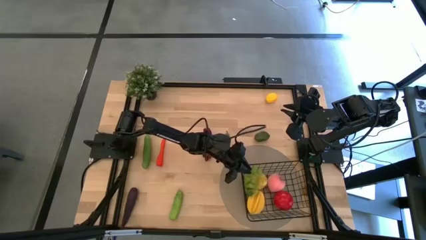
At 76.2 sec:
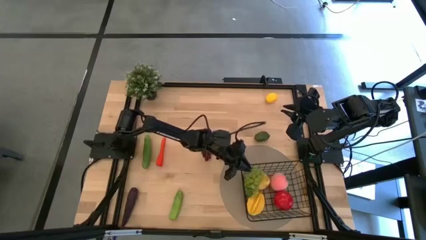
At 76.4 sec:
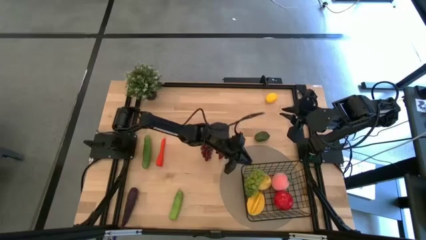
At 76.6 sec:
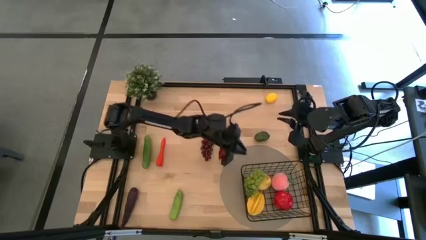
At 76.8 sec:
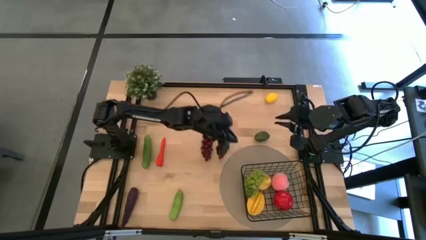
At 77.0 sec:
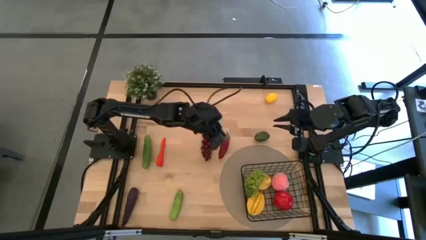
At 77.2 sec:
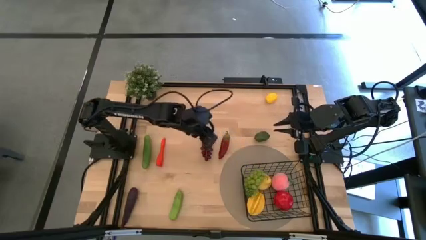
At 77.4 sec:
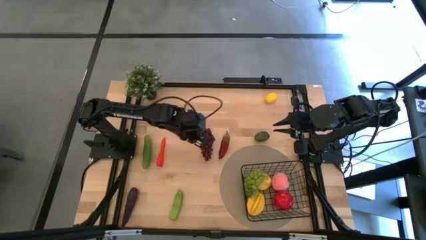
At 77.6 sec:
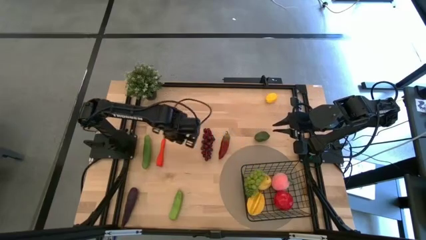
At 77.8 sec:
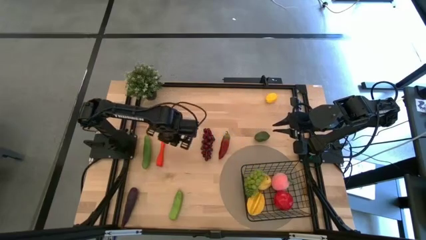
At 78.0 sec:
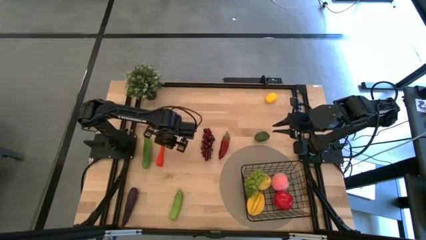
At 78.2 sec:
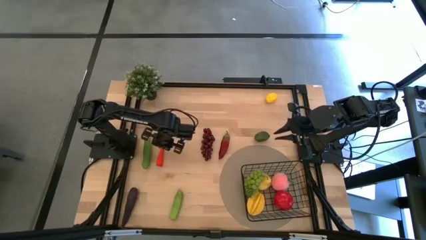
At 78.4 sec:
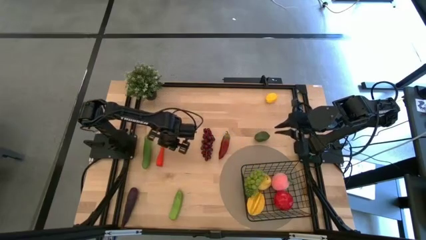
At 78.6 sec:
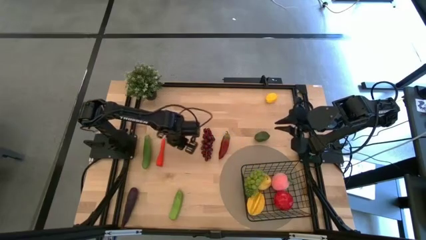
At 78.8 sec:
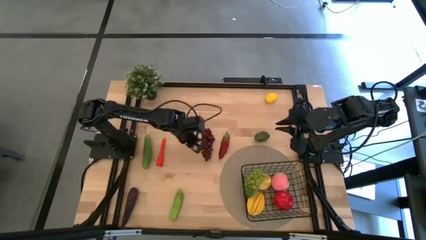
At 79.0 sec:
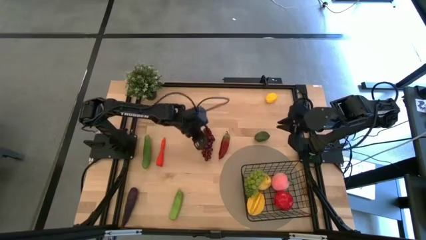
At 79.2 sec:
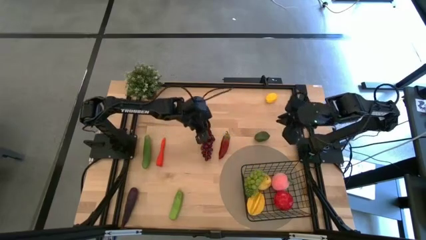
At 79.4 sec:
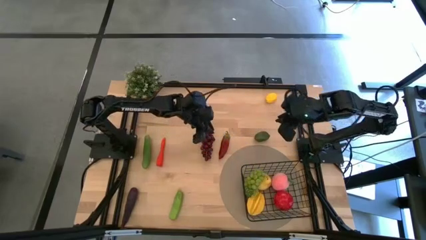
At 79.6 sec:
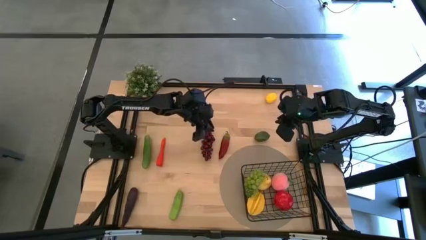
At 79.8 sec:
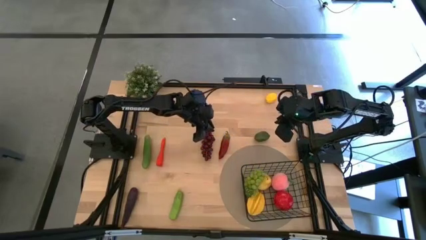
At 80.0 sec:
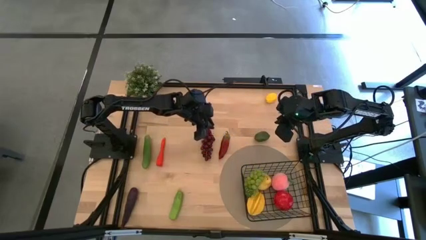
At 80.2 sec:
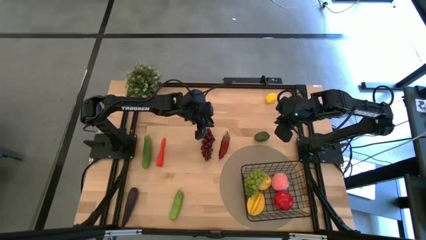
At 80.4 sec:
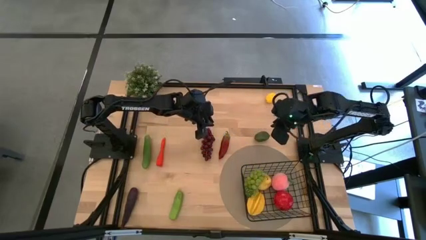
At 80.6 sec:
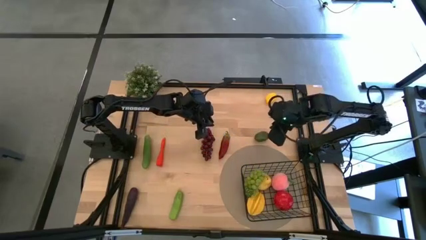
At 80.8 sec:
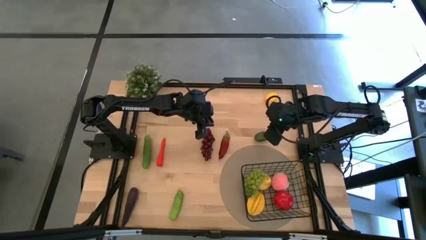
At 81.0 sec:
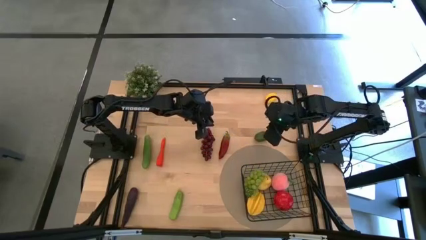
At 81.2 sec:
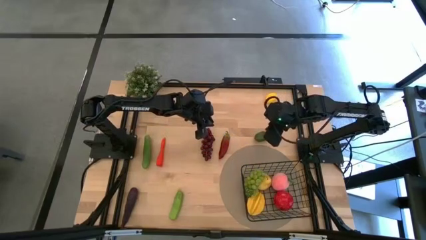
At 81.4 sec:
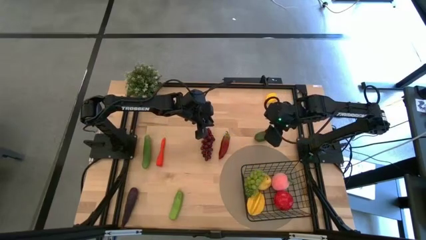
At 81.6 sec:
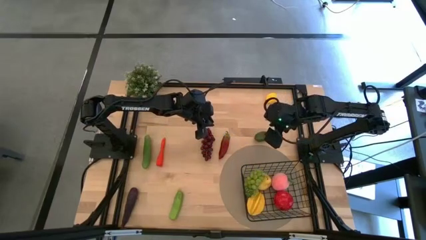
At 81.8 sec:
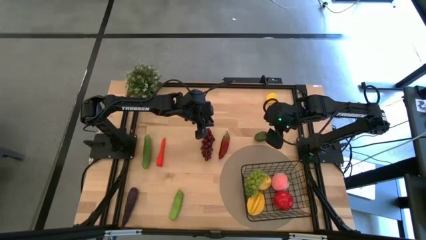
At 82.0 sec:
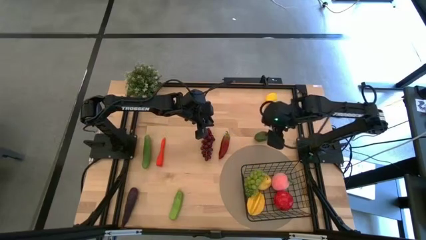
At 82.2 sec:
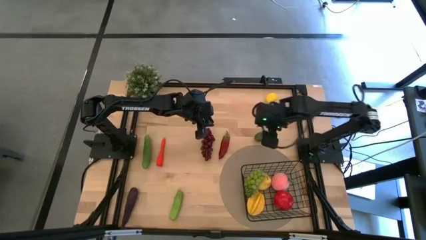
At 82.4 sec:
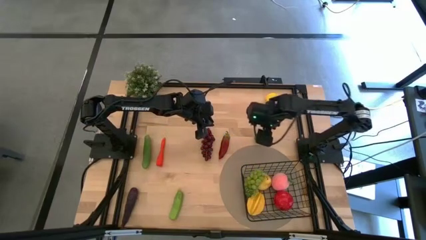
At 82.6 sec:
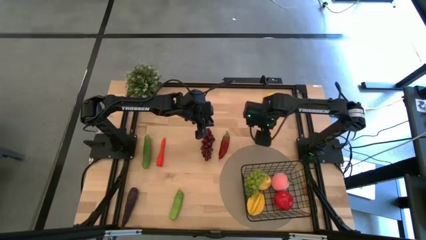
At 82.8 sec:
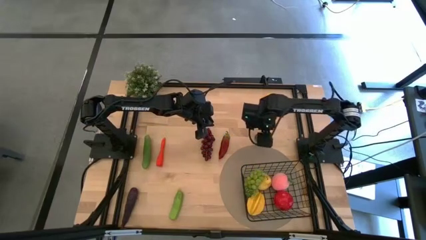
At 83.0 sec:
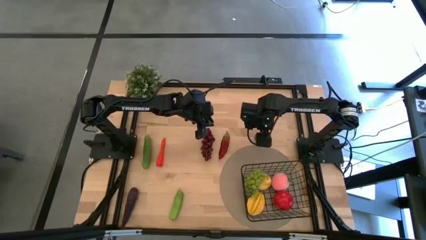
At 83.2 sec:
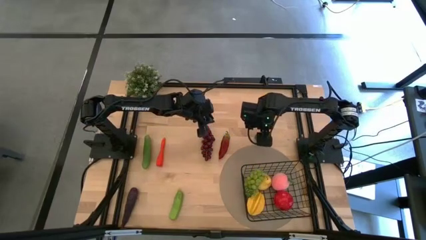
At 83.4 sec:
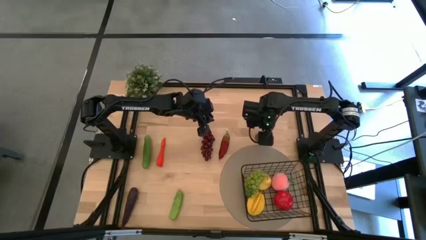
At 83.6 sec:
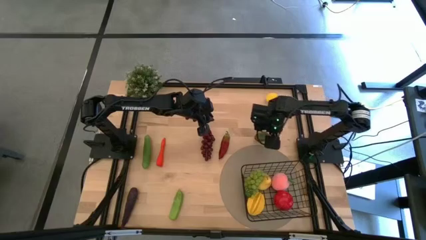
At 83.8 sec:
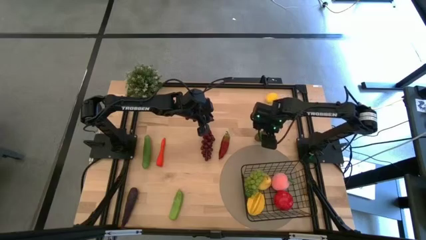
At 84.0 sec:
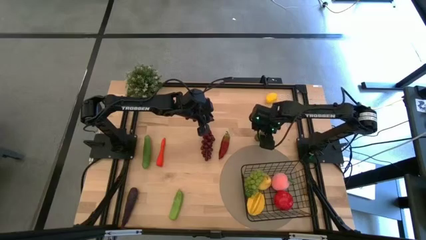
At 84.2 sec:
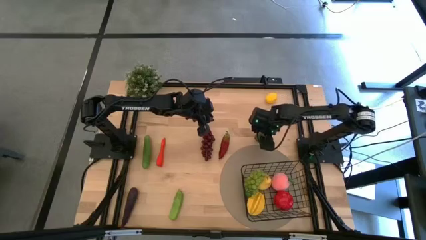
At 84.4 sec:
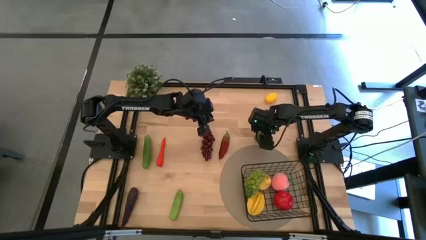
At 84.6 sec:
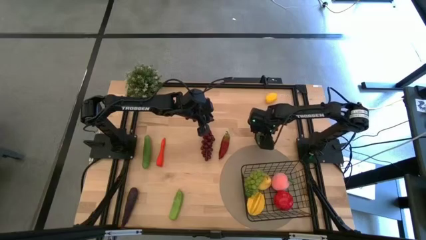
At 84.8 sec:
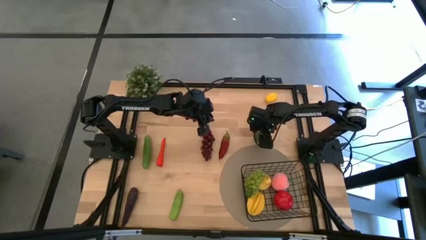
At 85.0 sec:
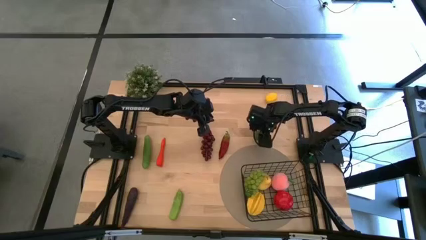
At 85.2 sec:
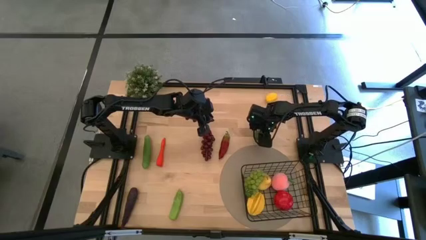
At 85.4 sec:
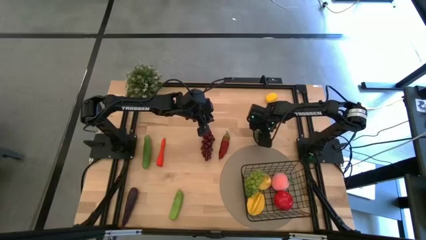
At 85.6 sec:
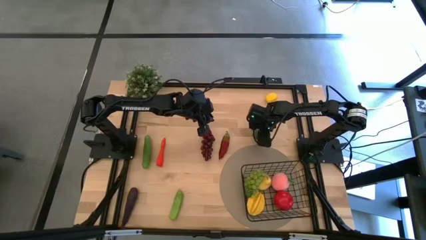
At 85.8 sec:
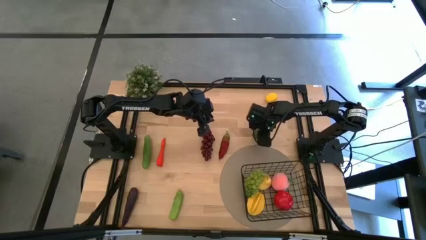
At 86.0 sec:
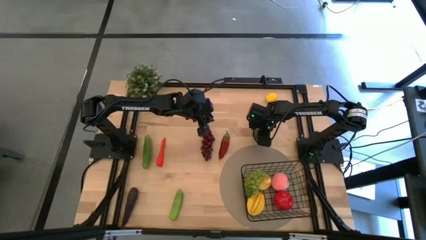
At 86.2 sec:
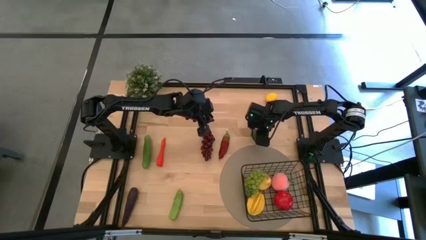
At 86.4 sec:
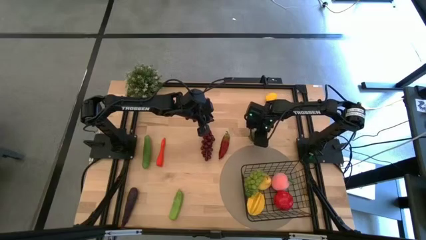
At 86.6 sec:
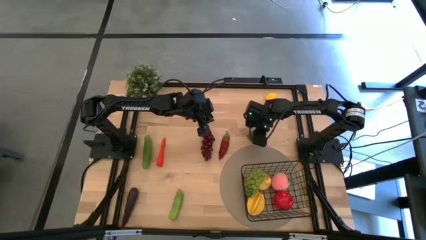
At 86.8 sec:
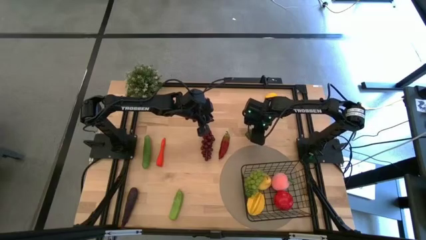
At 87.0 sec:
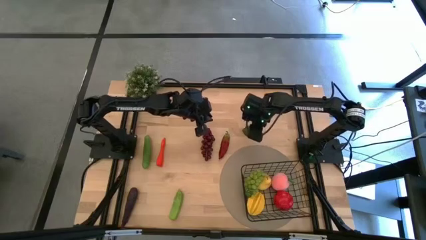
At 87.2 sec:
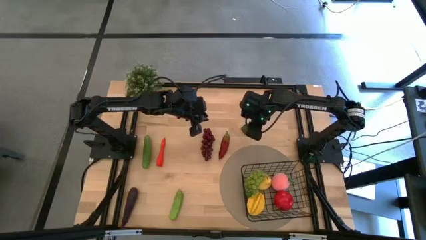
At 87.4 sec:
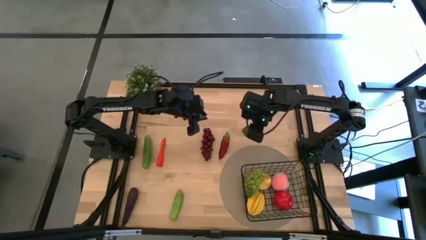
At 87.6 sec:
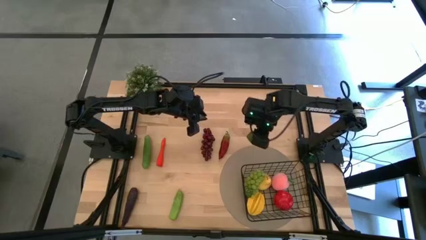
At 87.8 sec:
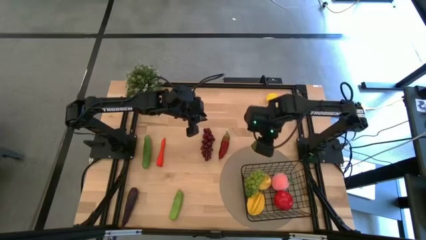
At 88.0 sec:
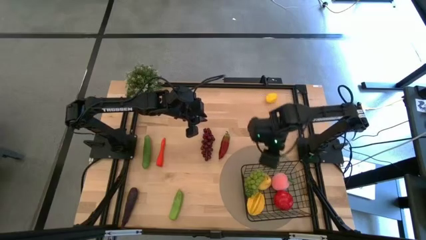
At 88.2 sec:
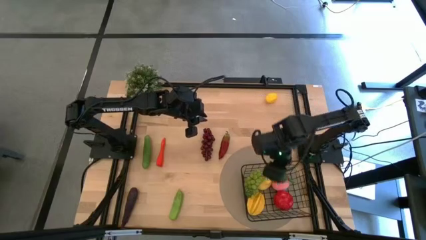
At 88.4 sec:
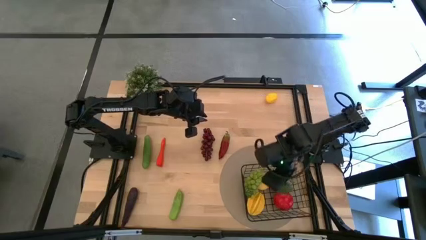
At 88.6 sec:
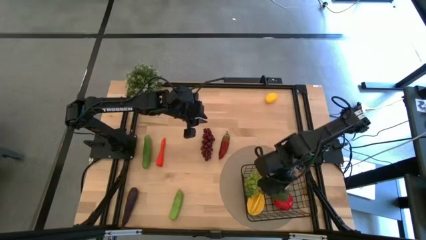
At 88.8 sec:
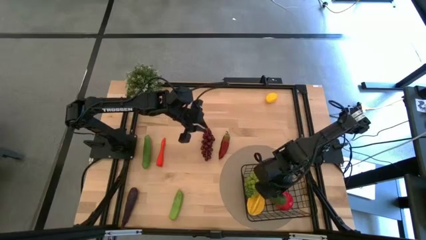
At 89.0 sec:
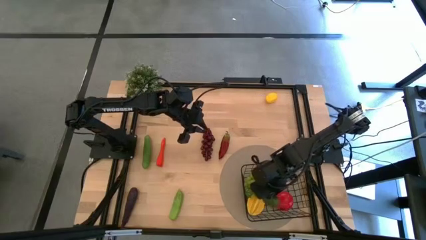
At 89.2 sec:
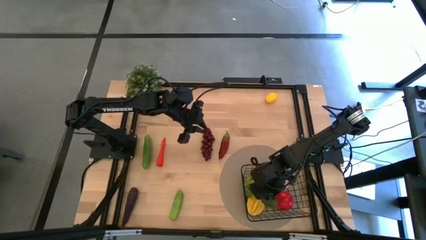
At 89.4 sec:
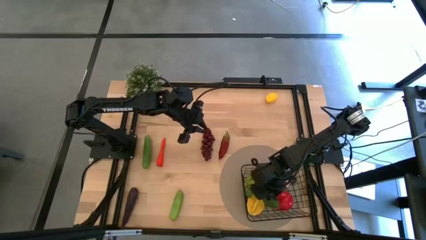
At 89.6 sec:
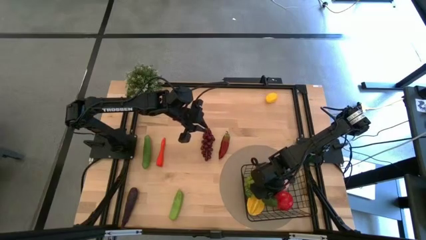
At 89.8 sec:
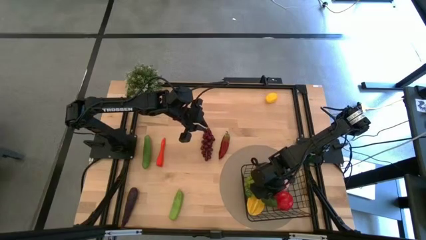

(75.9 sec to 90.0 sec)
Task: Build produce basket
Put the lime into the wire basket

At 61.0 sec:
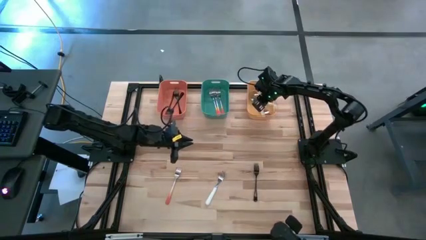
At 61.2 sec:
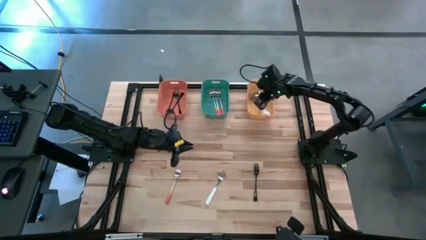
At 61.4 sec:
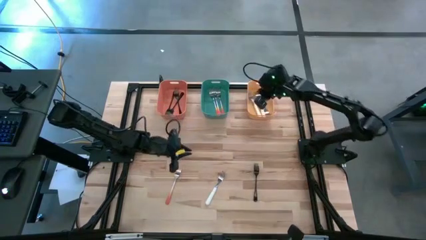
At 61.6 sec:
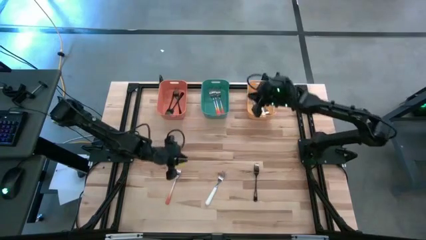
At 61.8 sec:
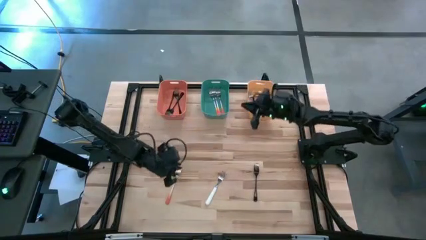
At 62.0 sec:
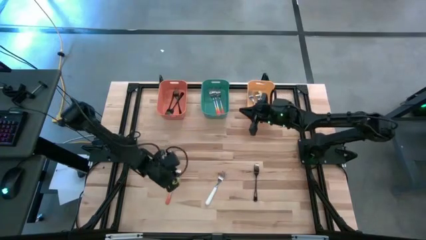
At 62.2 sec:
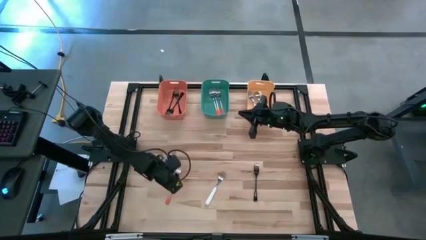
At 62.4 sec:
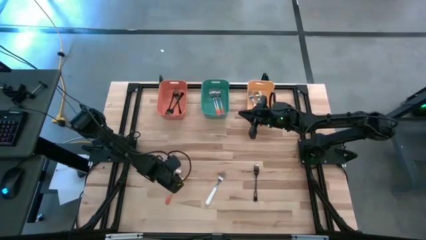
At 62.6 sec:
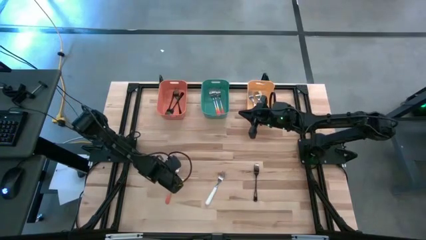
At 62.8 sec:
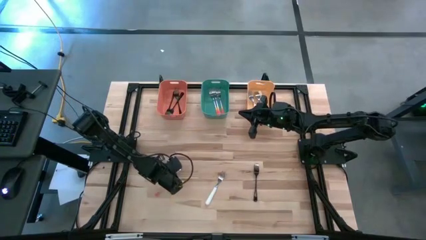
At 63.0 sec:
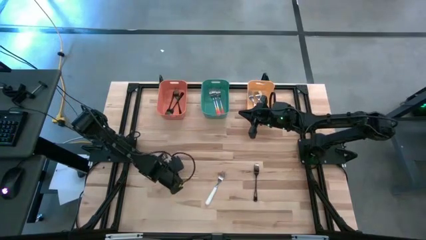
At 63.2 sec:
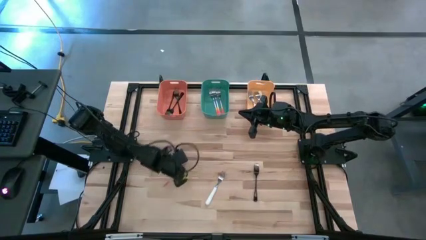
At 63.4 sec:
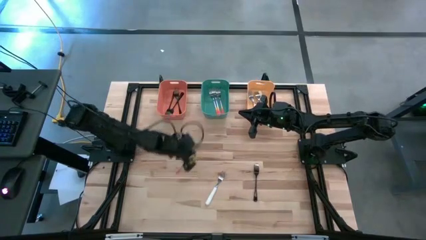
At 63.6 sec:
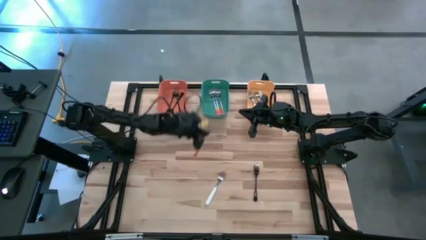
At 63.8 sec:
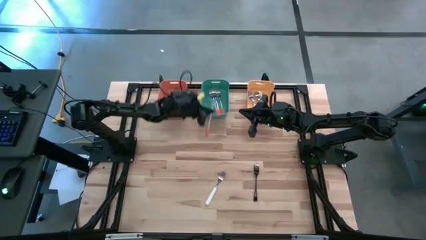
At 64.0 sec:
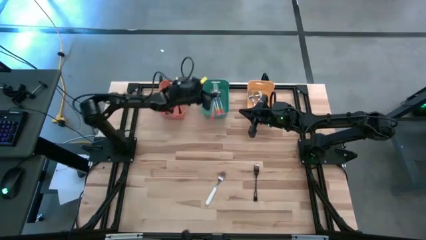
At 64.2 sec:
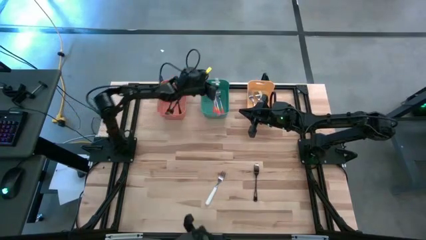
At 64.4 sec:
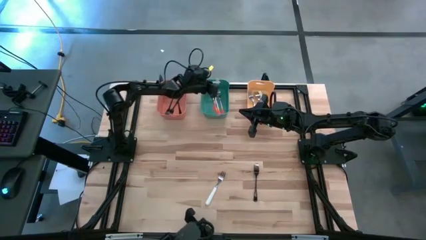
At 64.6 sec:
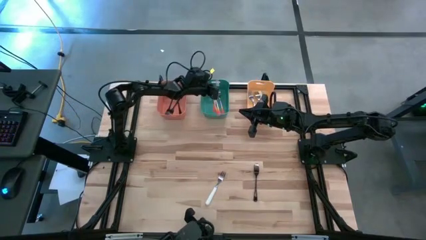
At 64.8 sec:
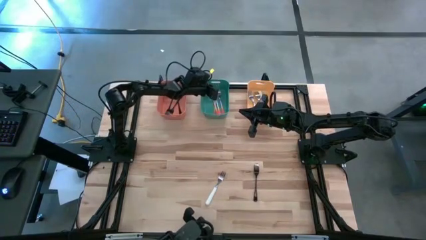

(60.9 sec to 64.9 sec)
Task: Sort silverware by color (type)
Put the orange fork into the green bin
